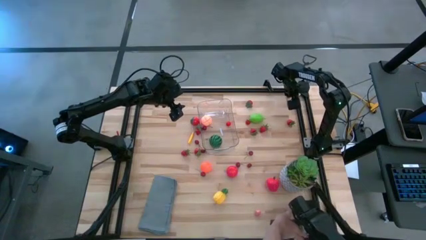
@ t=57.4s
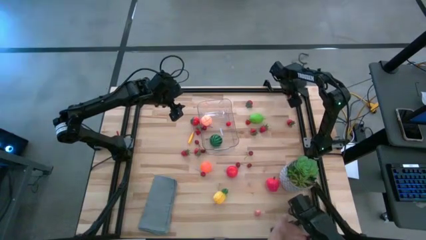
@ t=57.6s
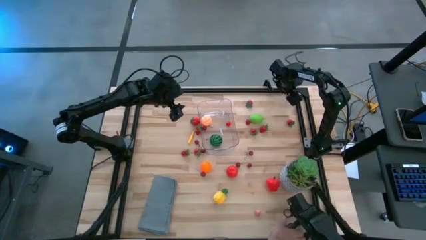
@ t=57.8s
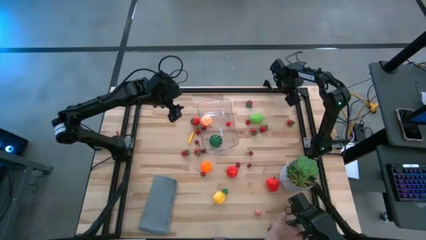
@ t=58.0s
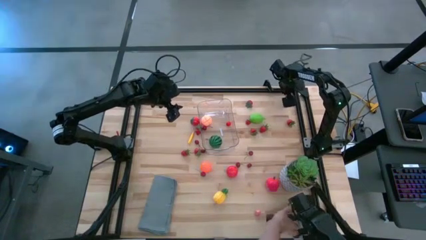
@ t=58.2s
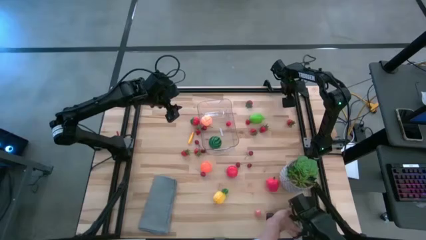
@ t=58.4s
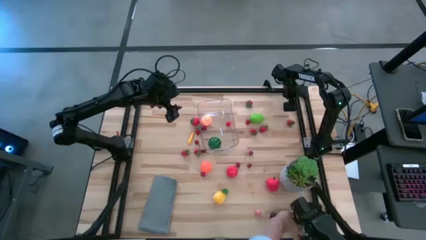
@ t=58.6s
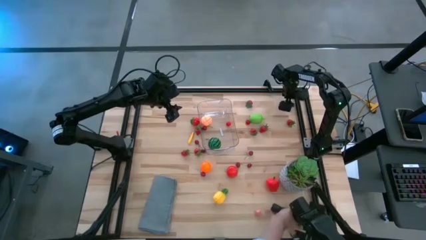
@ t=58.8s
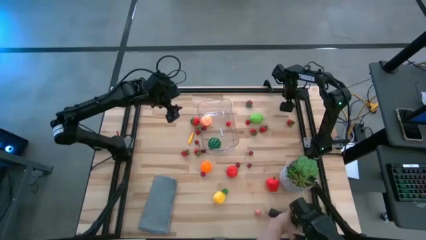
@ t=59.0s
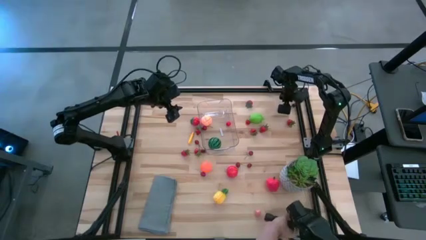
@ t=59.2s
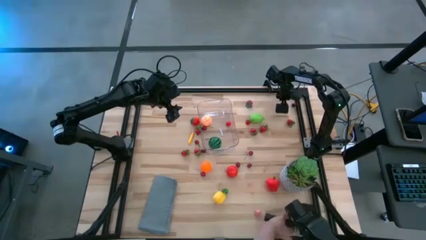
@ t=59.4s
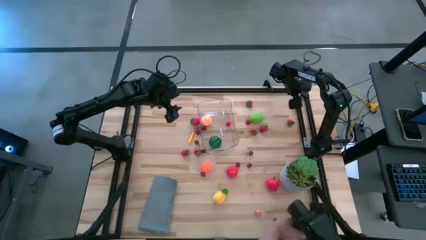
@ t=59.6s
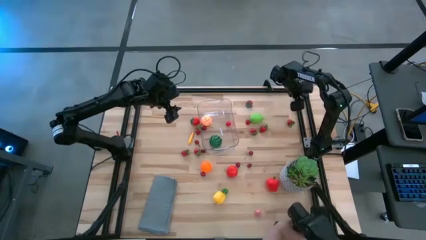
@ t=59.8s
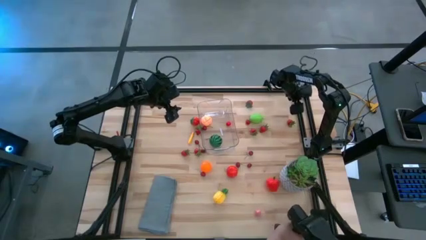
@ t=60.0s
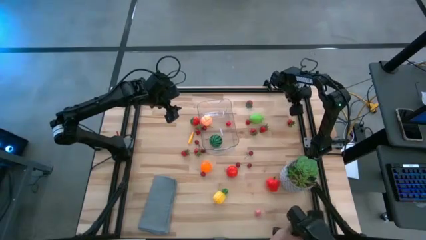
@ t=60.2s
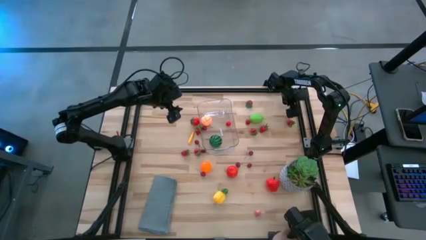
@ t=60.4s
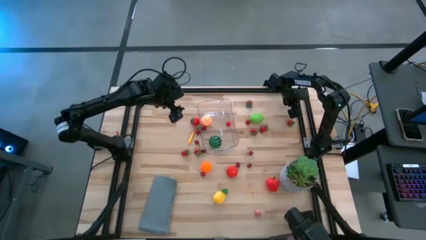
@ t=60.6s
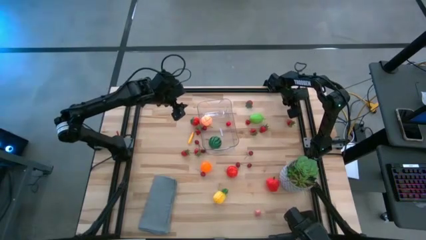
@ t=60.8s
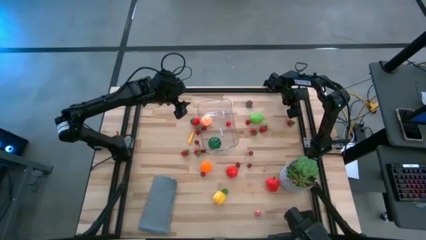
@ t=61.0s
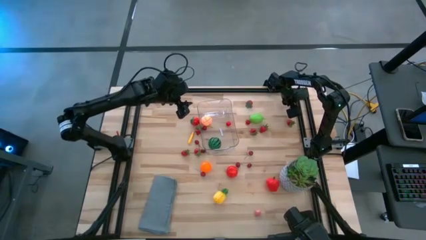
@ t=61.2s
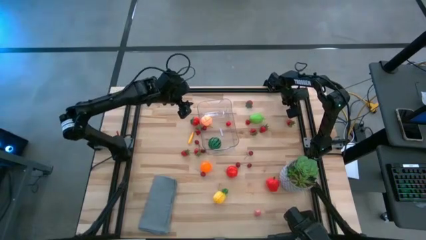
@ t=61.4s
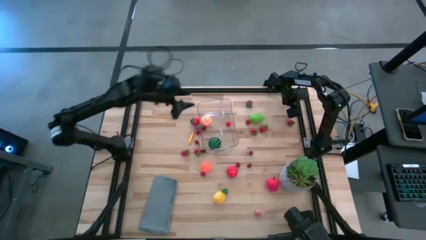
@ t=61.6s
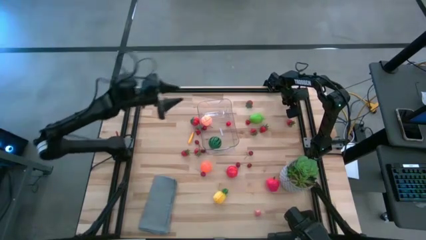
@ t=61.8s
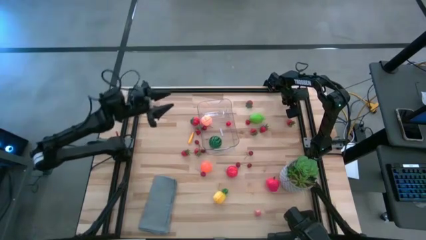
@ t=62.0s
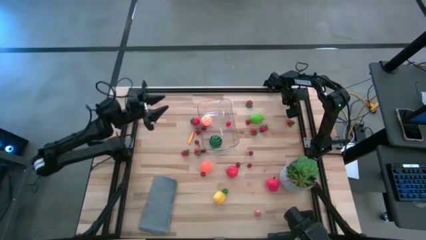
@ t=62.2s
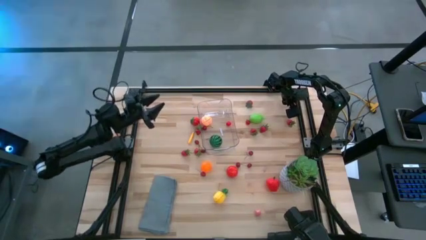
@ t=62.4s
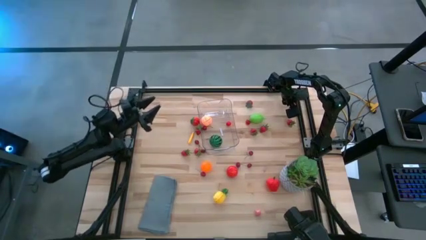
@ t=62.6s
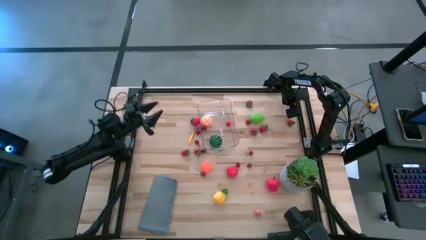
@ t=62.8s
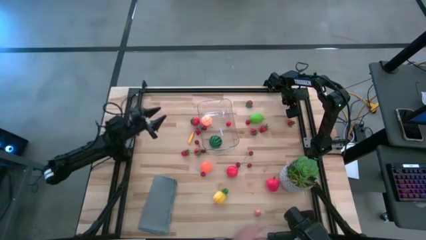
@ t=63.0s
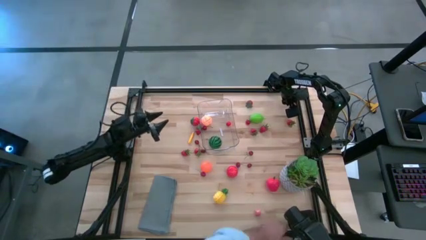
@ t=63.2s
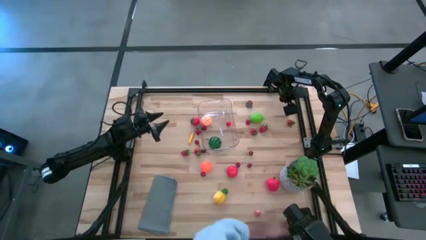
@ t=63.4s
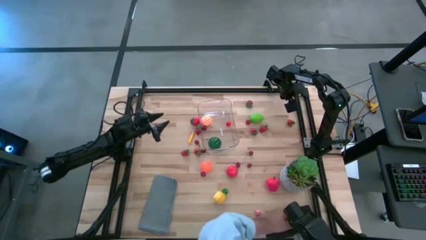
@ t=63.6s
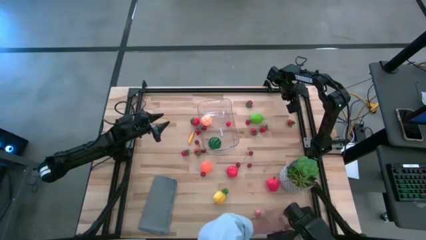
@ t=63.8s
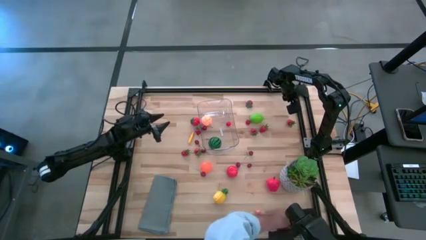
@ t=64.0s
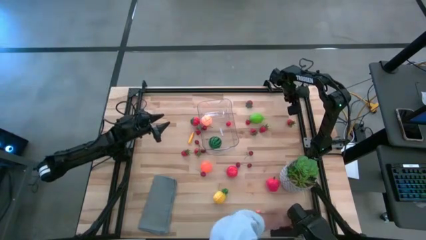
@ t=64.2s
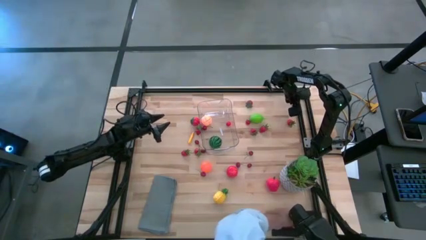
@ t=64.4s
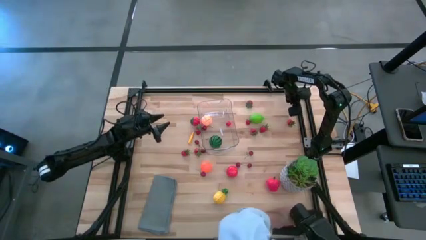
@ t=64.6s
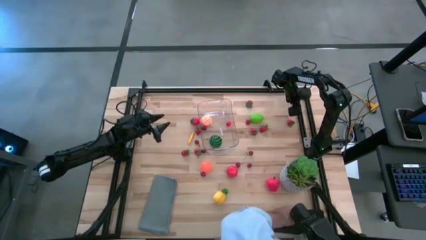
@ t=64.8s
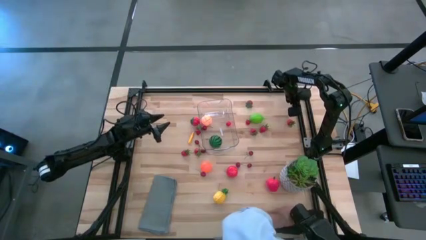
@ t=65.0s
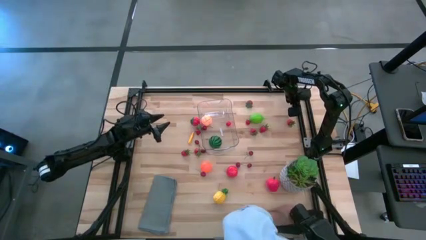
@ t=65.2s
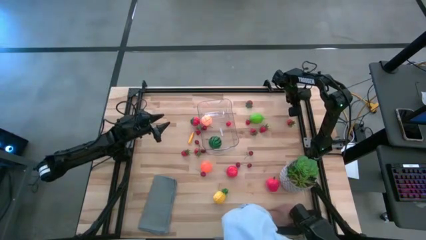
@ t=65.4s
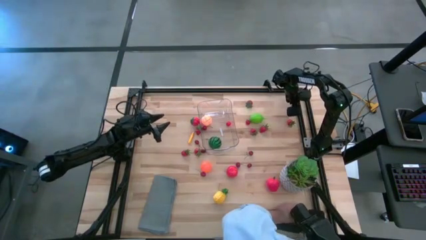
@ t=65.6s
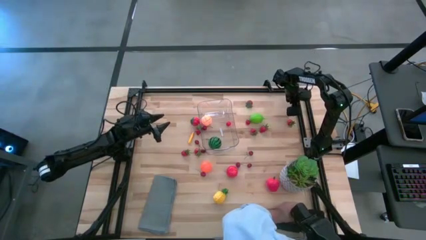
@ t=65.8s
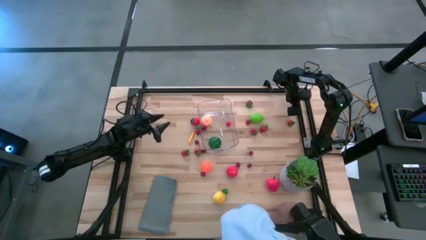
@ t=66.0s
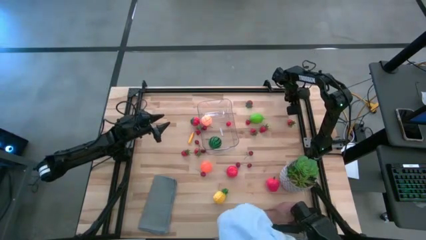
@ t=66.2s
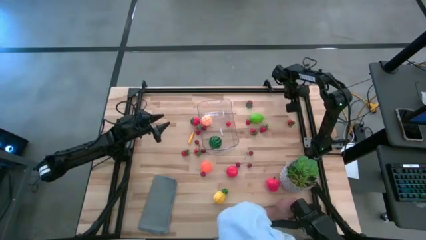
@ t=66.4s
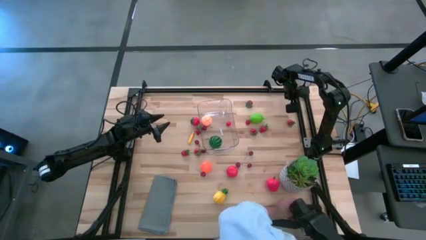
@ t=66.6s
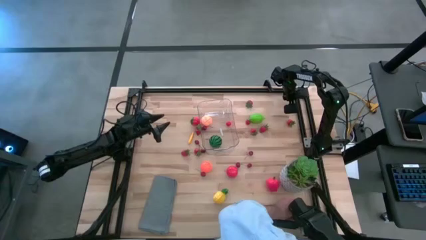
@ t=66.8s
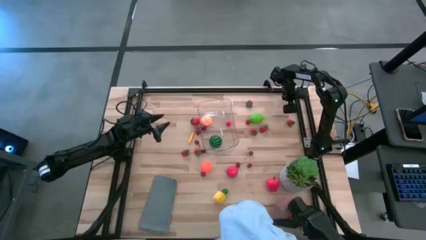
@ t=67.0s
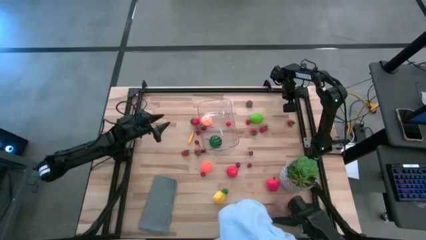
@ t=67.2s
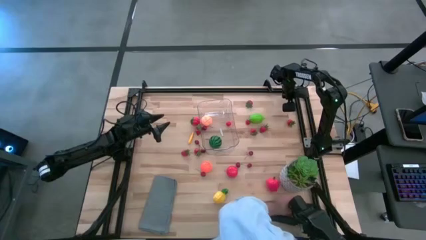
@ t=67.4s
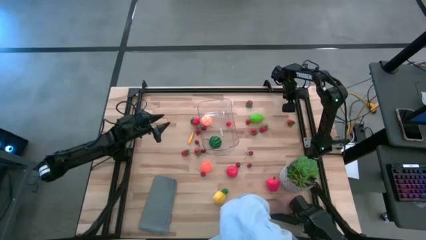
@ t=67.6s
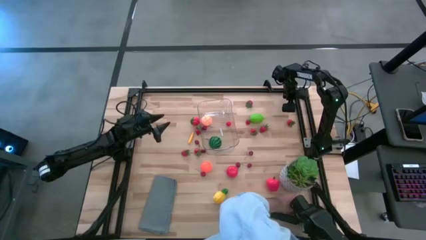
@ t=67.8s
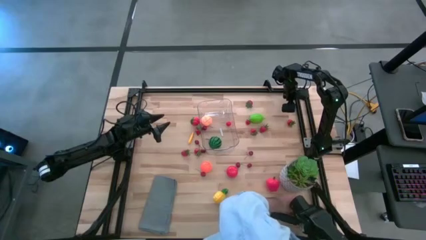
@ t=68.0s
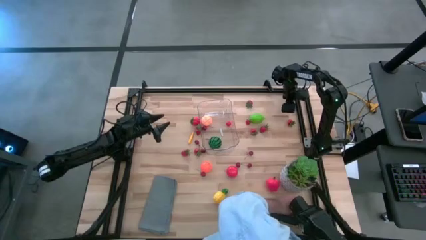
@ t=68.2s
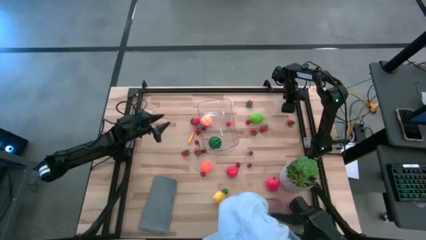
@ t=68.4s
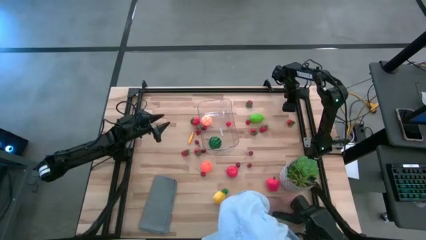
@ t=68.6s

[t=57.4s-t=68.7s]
Task: Pick and placing Produce into tupperware
Put the red cherry into the transparent container

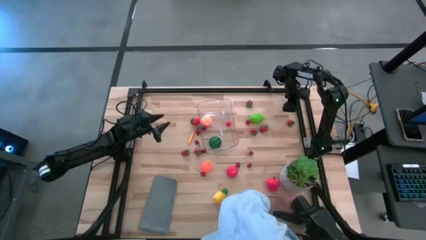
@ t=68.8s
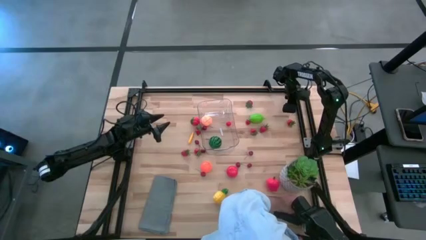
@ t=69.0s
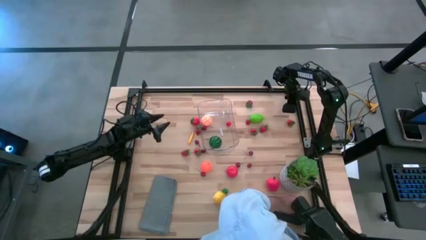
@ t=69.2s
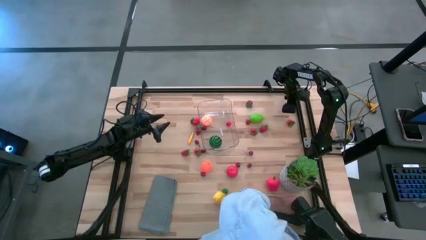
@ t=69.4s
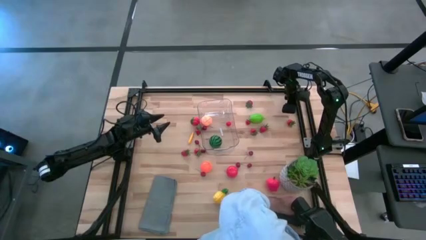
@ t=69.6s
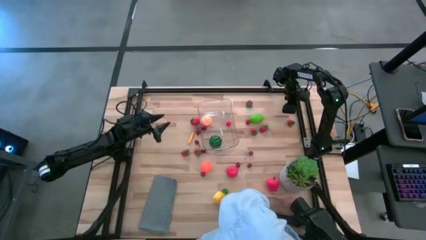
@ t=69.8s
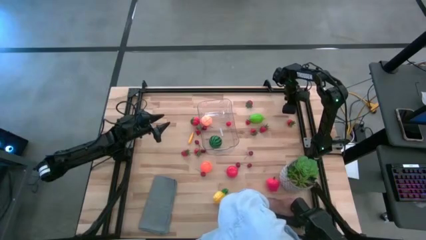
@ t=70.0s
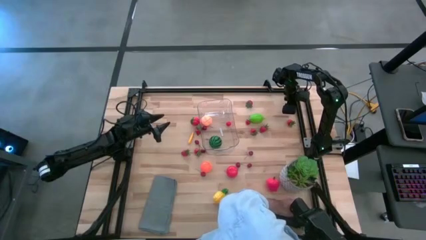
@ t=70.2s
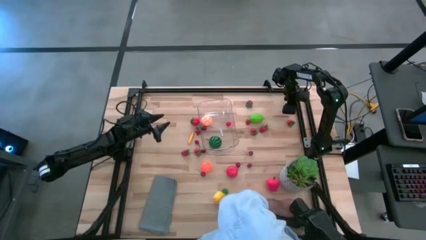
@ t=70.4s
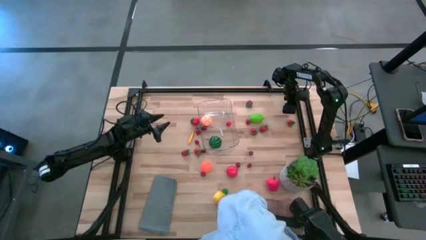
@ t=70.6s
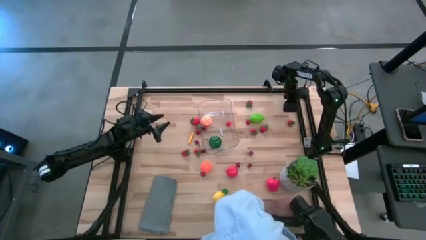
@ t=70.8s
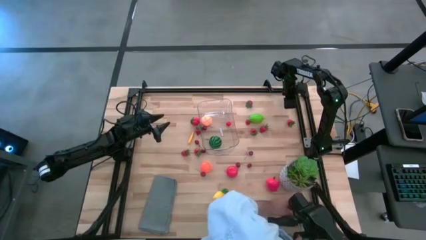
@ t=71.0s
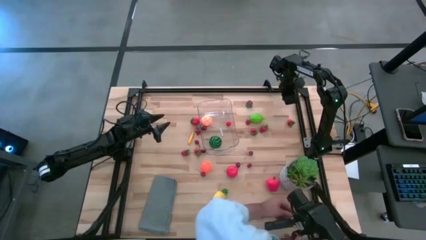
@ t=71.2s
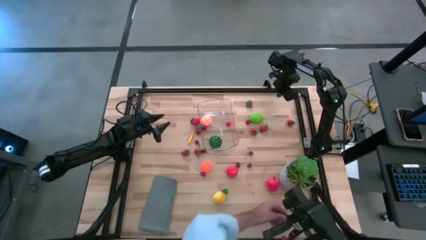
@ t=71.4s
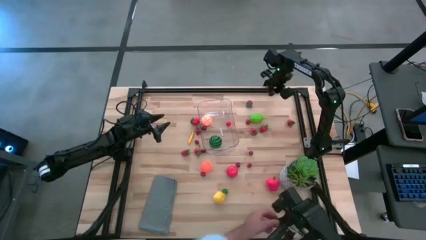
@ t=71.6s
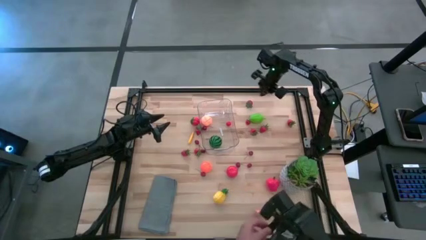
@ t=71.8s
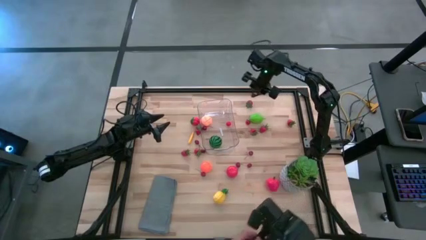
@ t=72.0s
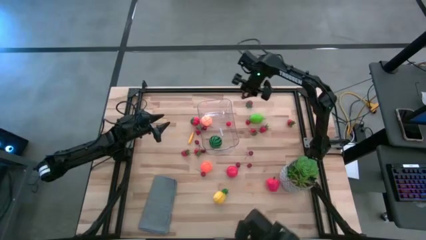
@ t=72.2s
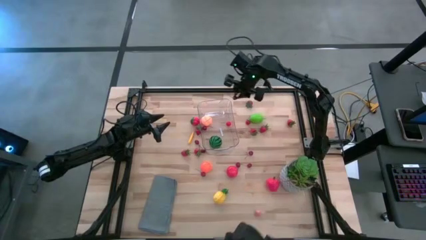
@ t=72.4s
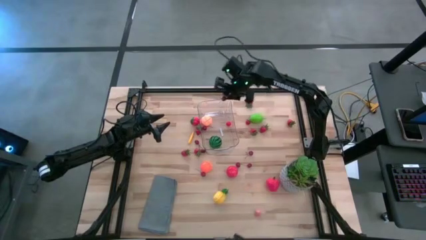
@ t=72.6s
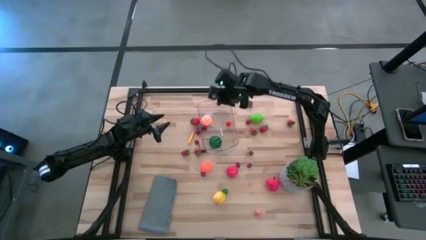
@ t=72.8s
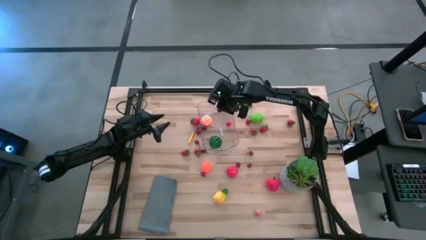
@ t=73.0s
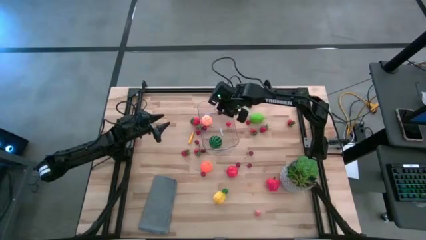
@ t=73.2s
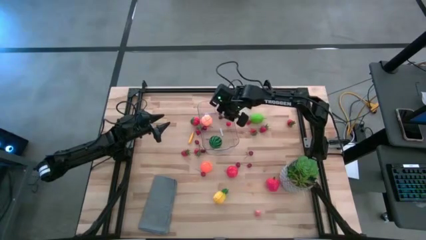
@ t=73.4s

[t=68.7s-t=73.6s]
Put the red cherry into the transparent container
